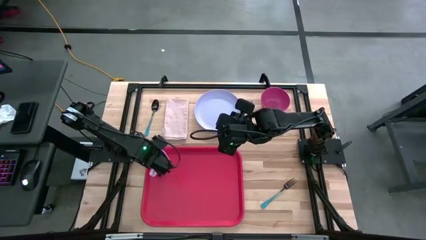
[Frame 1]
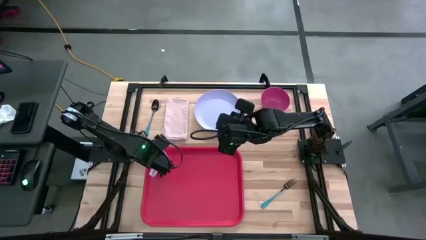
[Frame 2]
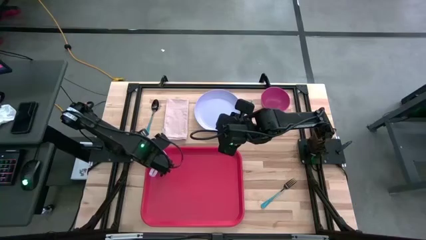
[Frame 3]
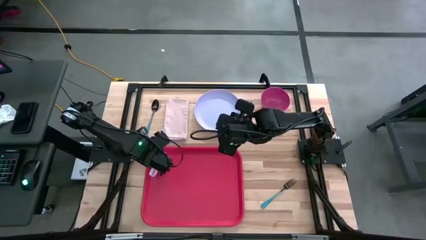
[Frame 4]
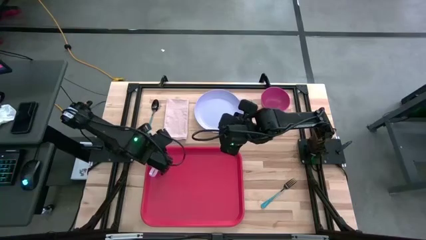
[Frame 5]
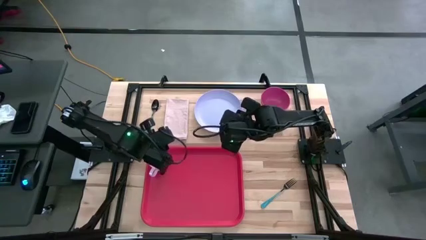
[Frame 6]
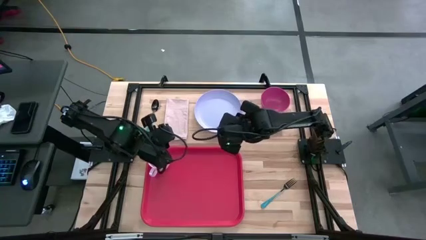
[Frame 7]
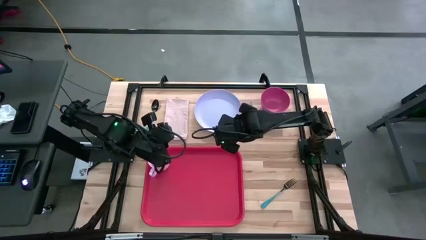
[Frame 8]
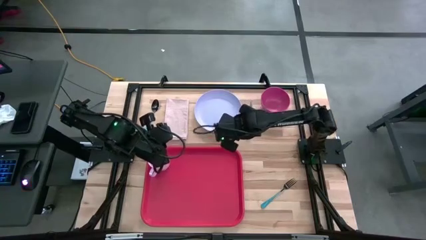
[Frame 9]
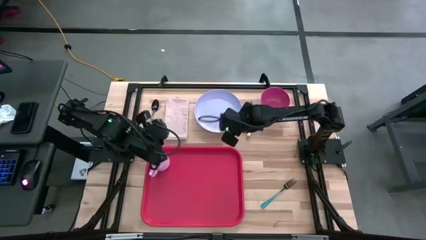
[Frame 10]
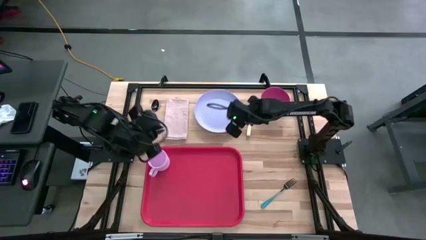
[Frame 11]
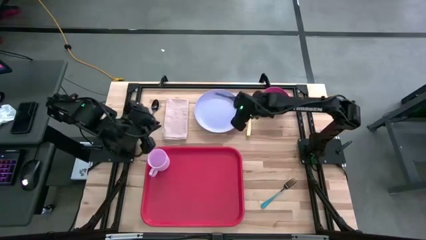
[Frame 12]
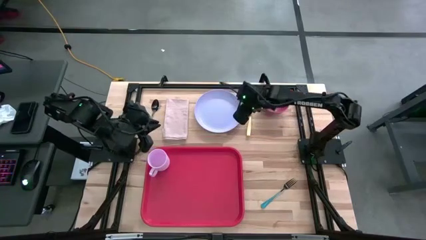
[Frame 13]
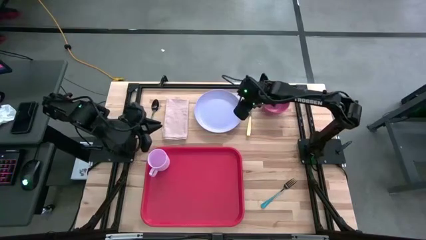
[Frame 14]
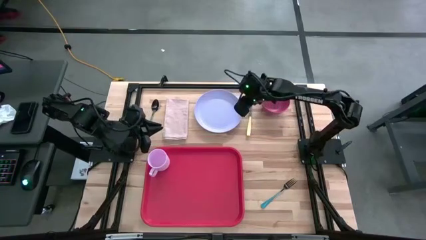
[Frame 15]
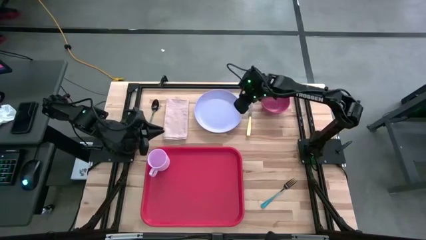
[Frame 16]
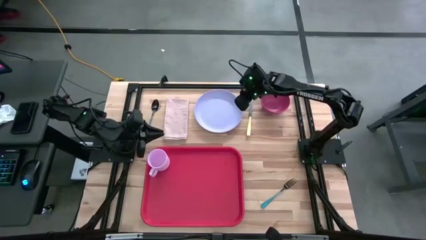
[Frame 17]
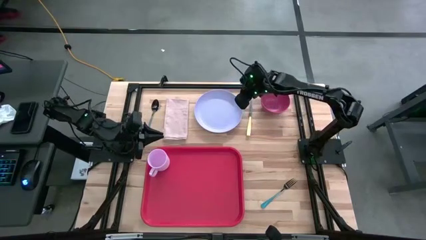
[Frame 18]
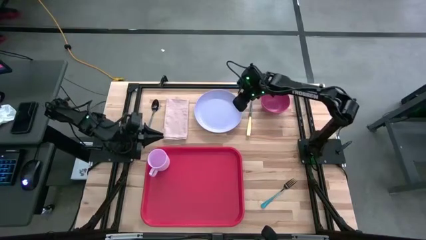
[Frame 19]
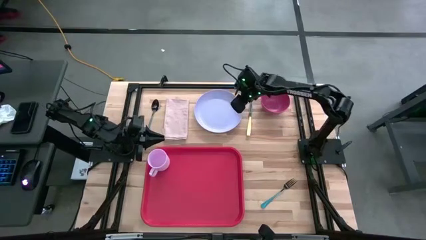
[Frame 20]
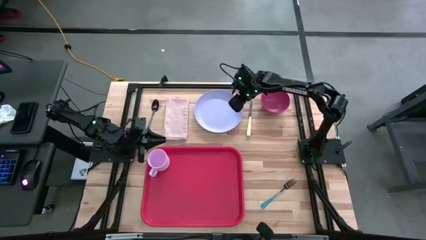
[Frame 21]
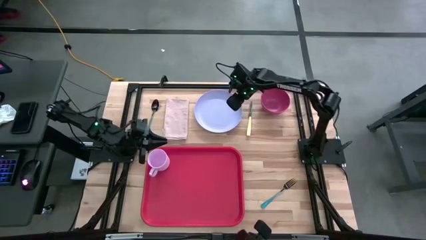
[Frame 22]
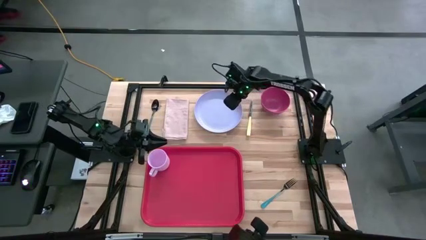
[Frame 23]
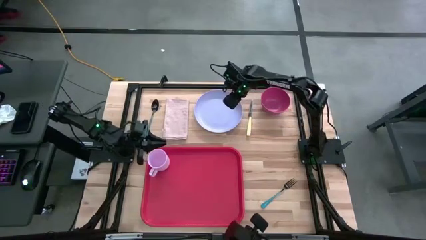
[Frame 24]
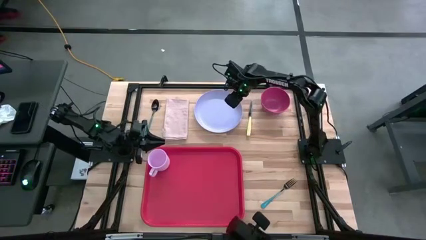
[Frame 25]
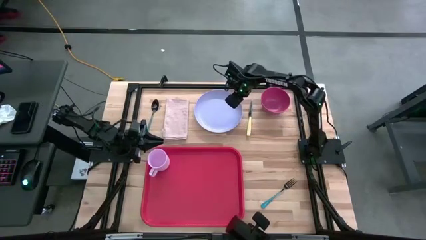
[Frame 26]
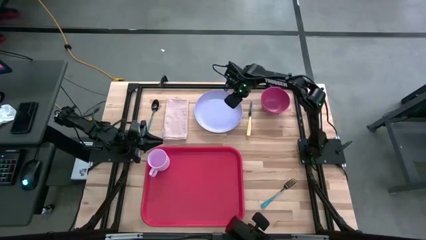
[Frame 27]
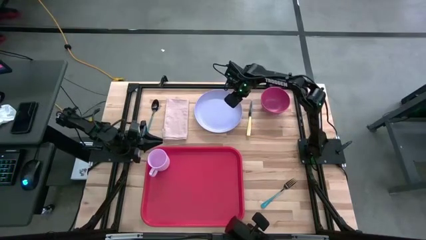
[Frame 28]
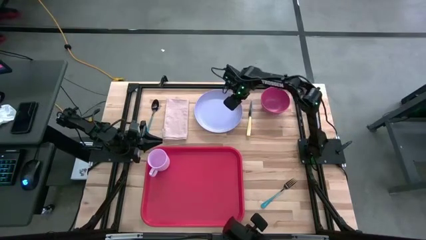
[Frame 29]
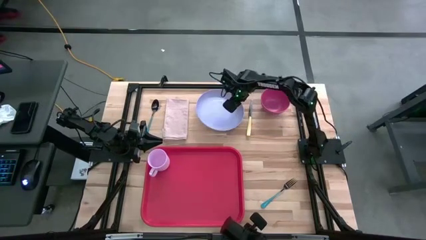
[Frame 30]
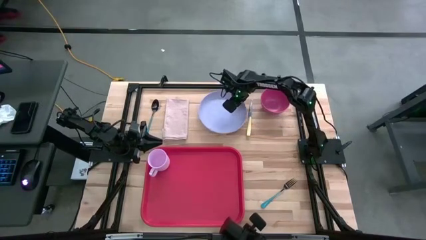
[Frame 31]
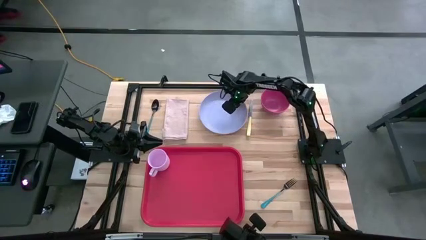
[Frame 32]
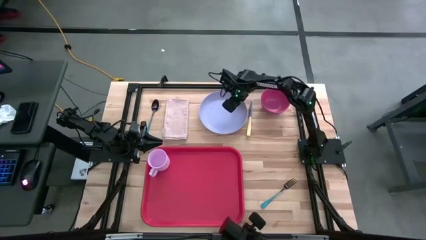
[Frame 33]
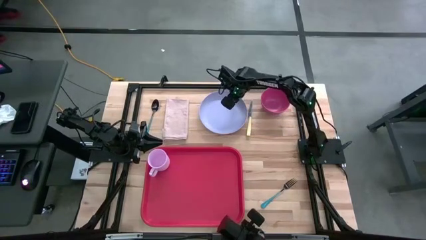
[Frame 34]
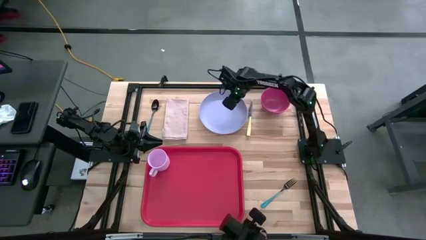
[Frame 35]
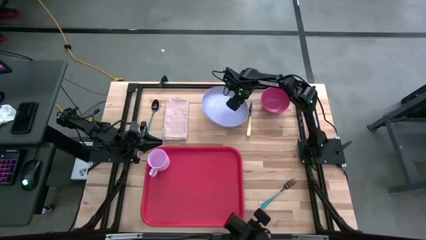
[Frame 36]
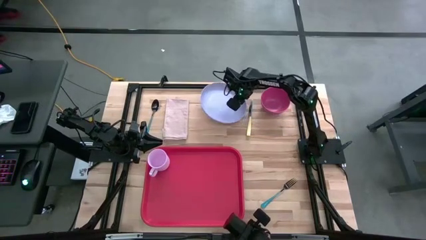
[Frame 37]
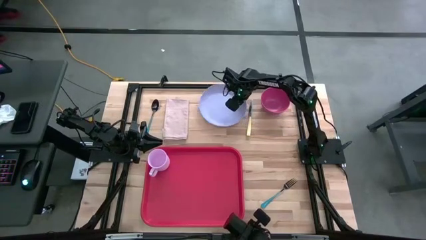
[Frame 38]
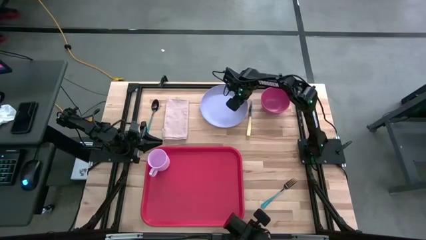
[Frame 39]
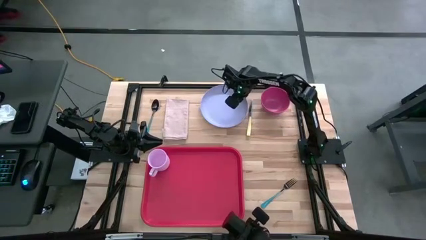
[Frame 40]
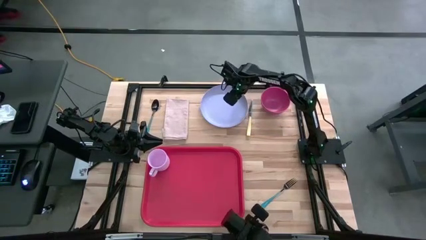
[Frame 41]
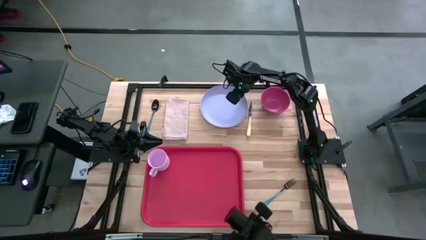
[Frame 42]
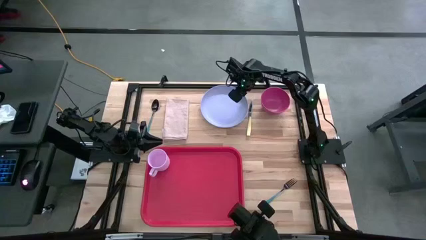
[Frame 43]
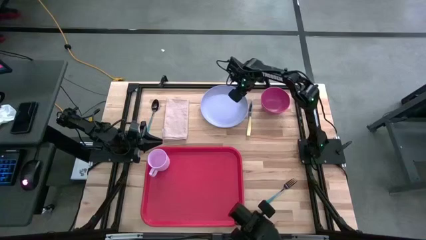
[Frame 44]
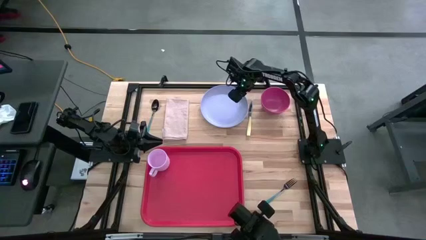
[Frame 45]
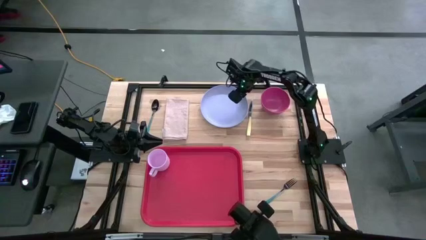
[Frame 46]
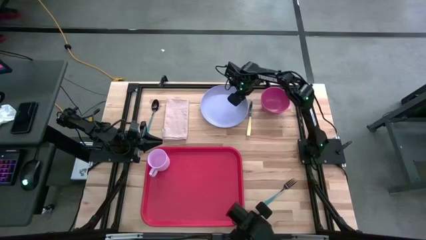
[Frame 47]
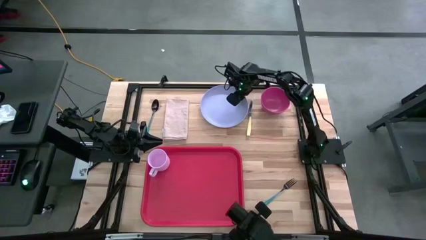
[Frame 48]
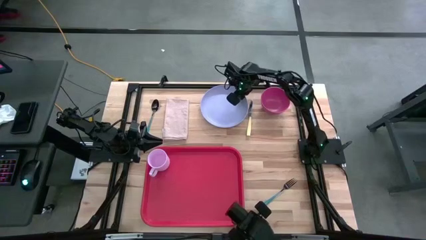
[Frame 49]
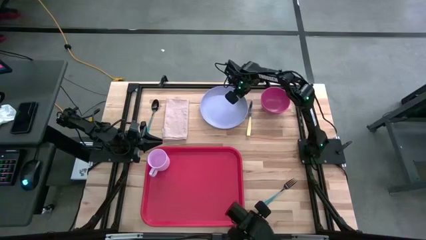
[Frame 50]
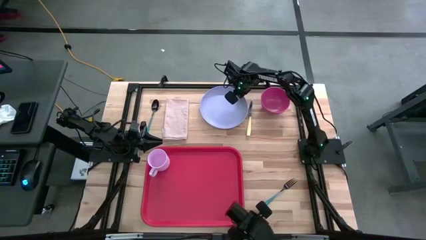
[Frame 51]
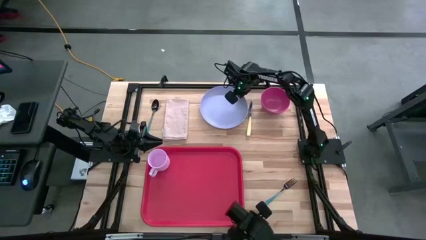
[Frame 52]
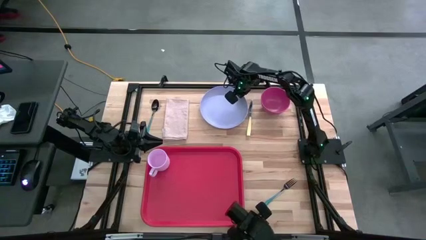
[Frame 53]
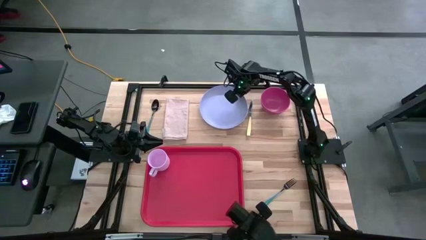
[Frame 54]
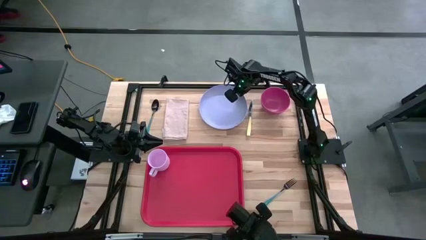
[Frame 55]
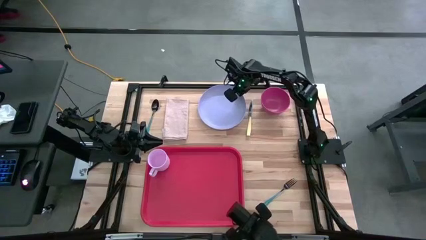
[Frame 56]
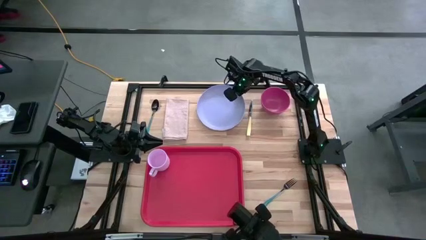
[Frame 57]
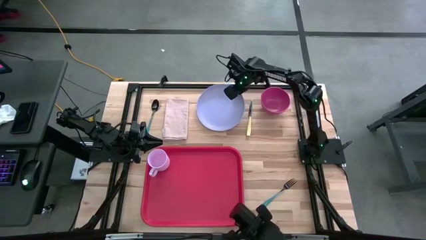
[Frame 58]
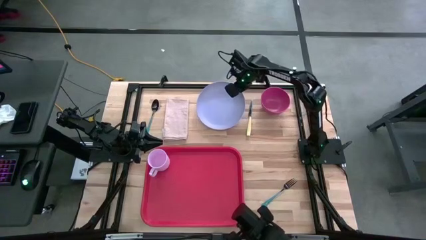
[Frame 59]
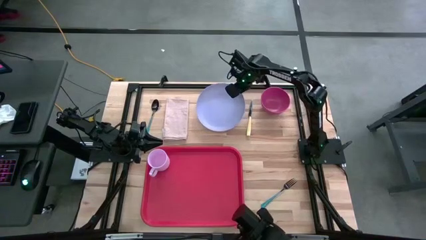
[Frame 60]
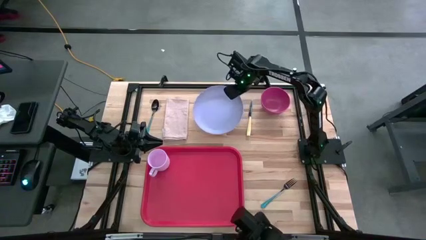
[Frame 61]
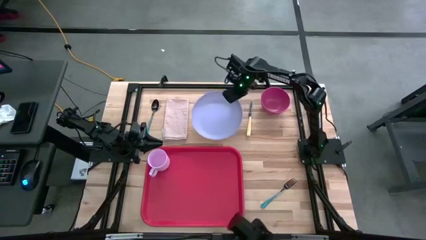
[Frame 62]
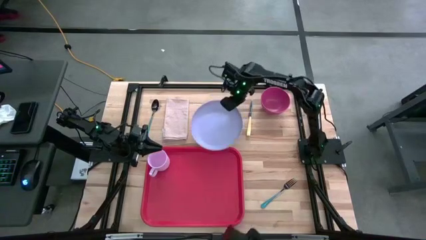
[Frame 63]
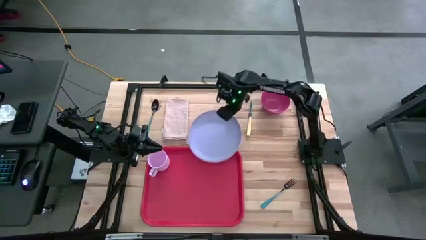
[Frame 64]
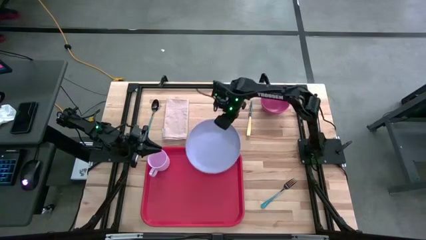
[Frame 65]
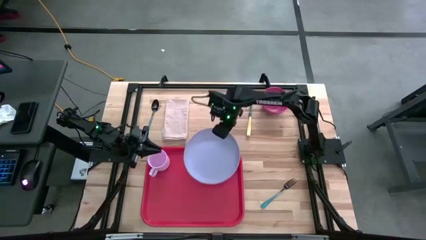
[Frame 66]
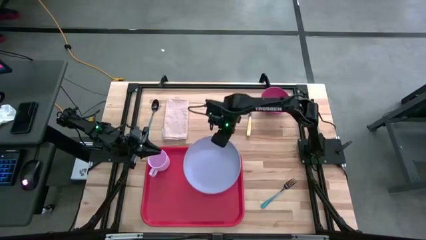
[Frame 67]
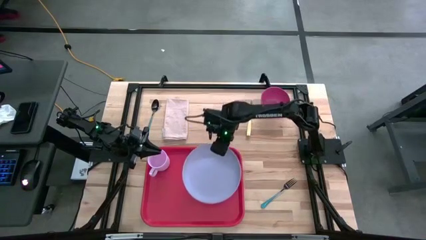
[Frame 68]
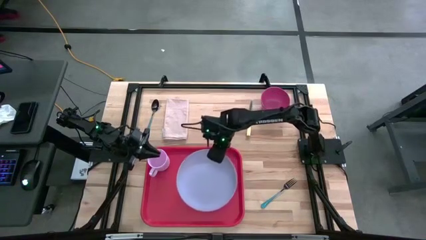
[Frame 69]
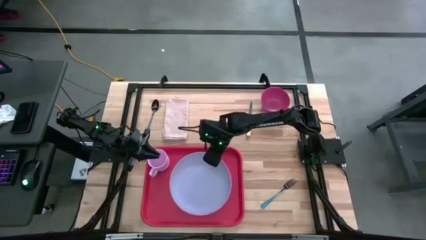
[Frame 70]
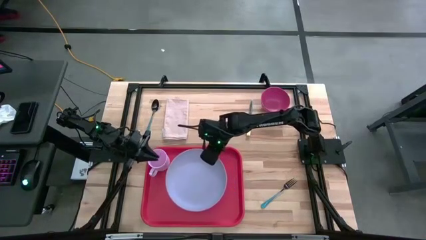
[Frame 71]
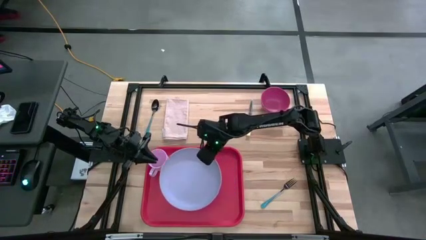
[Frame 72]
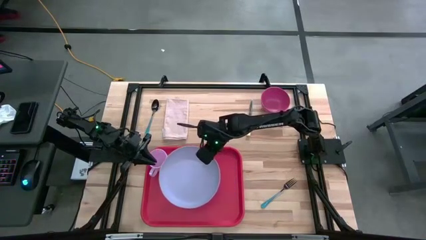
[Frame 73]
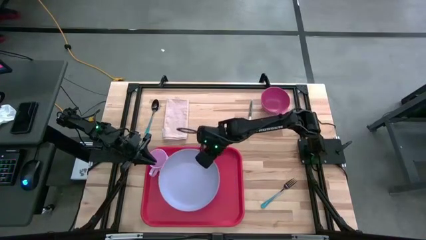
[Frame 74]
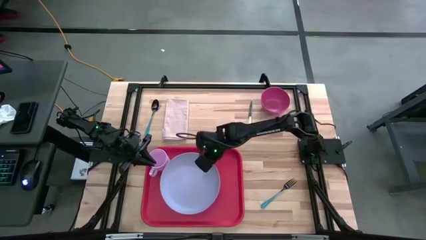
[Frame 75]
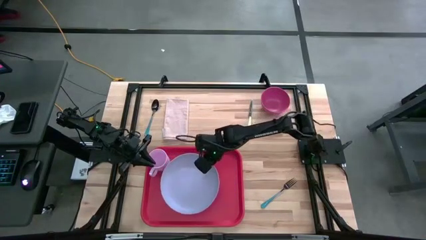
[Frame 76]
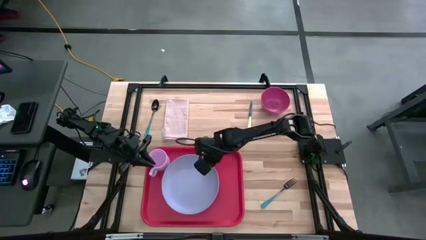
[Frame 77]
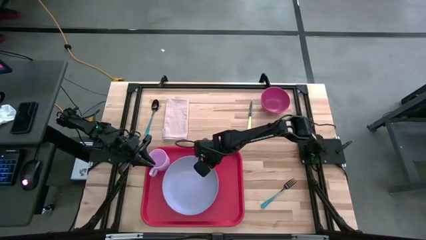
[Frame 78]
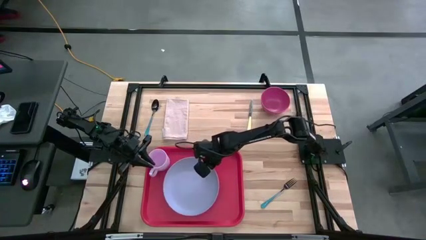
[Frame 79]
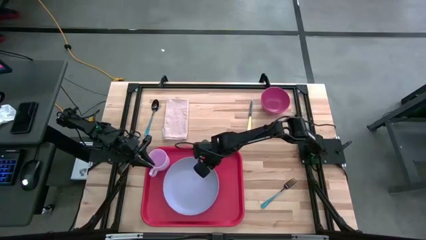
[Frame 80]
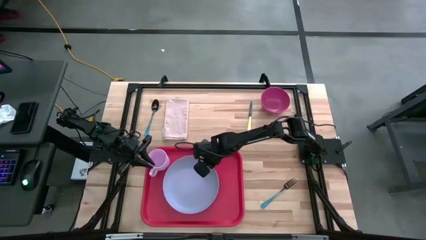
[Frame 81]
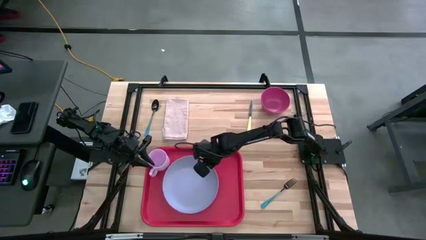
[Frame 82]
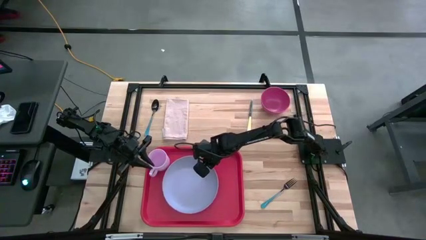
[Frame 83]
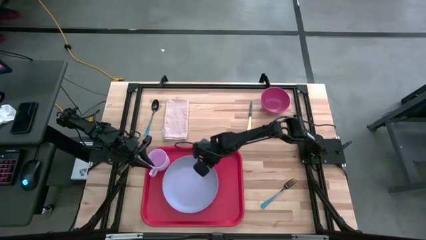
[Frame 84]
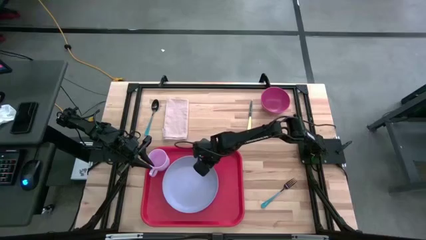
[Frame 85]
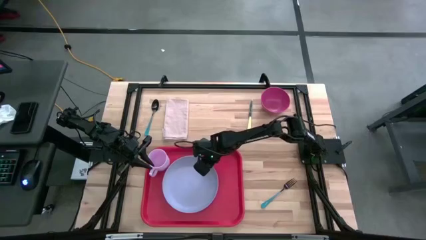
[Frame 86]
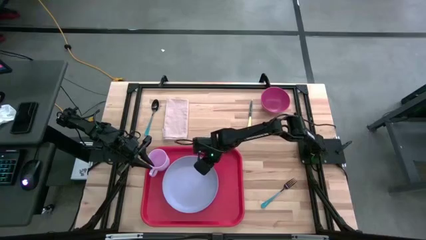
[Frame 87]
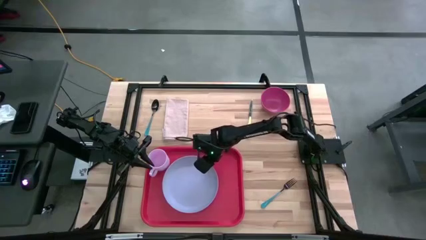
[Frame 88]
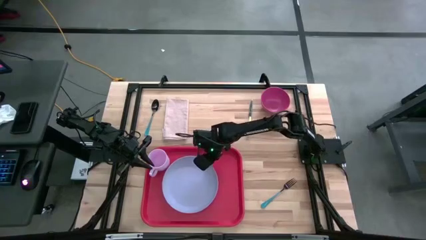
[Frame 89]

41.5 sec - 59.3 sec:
Task: Set up tray
Put the blue plate on the bottom of the pink mug on the orange serving tray
